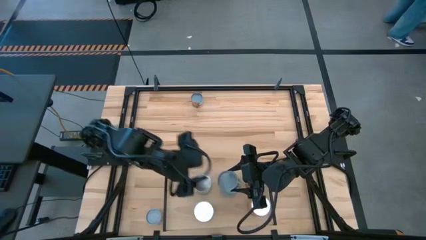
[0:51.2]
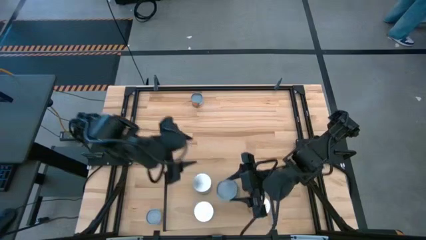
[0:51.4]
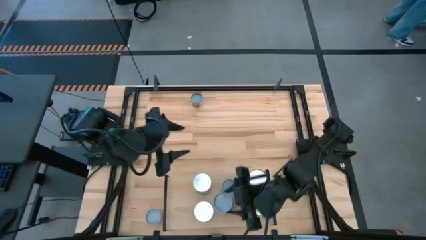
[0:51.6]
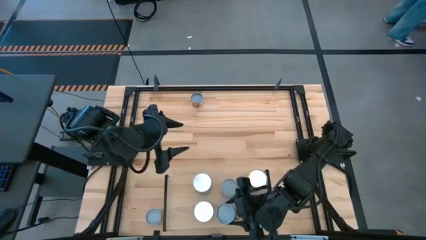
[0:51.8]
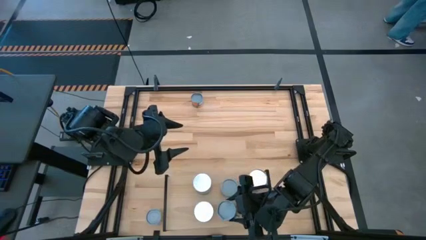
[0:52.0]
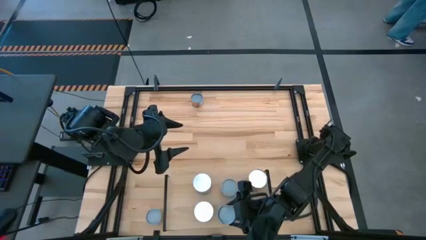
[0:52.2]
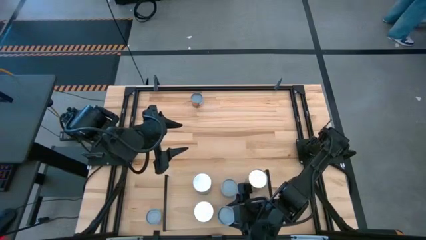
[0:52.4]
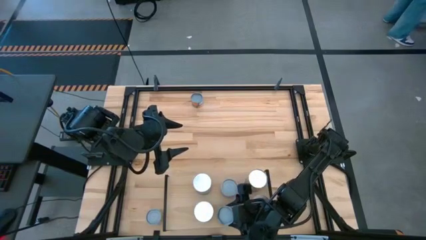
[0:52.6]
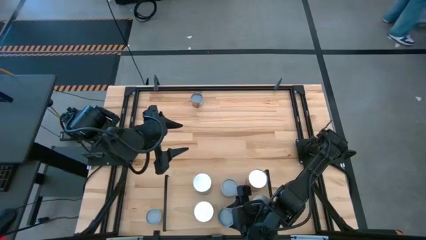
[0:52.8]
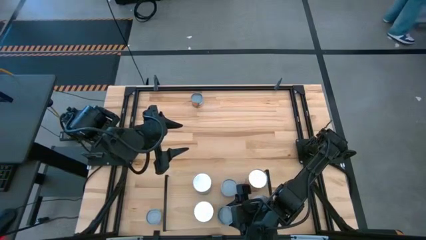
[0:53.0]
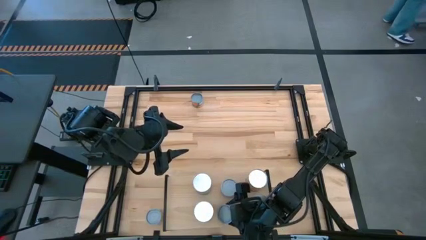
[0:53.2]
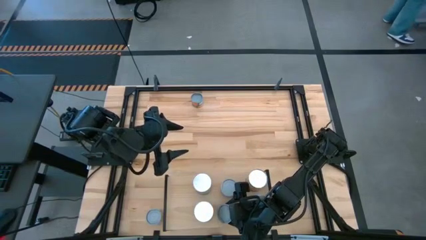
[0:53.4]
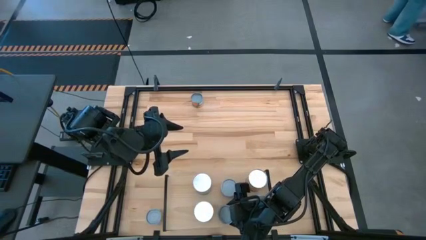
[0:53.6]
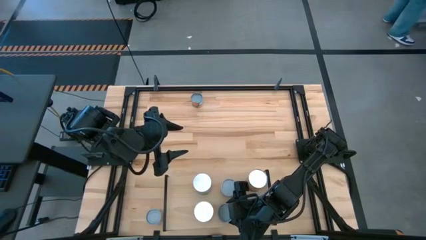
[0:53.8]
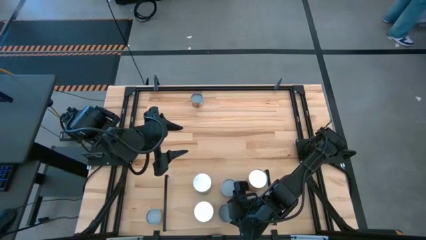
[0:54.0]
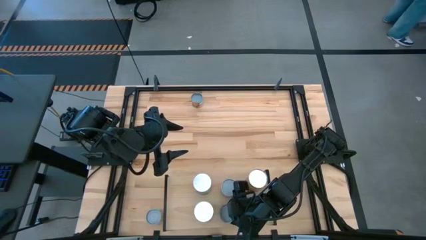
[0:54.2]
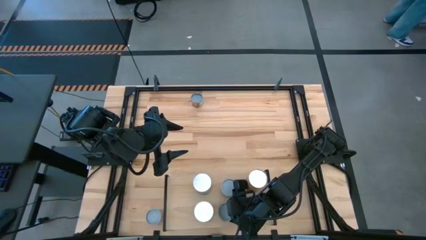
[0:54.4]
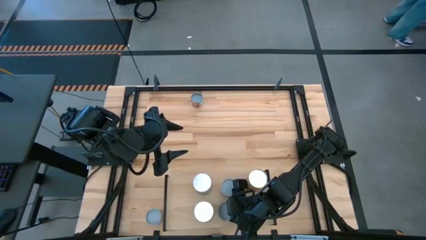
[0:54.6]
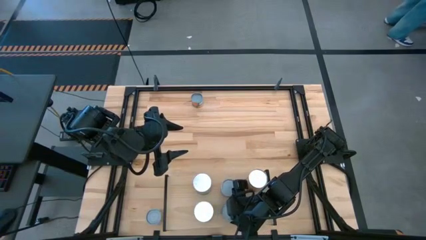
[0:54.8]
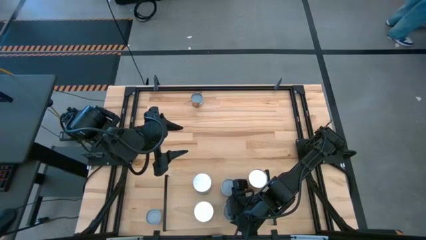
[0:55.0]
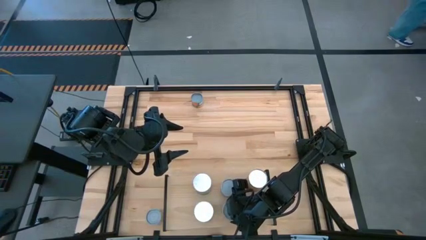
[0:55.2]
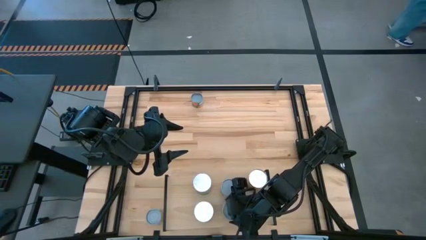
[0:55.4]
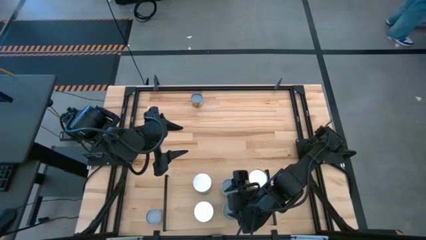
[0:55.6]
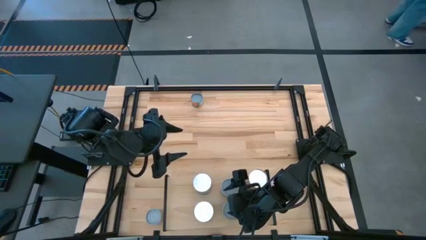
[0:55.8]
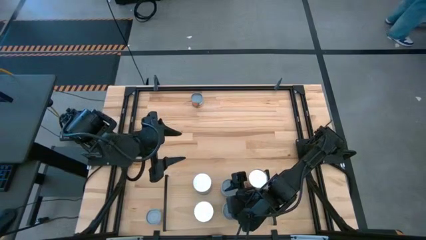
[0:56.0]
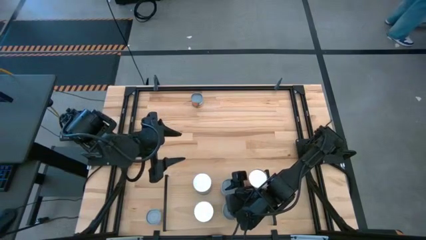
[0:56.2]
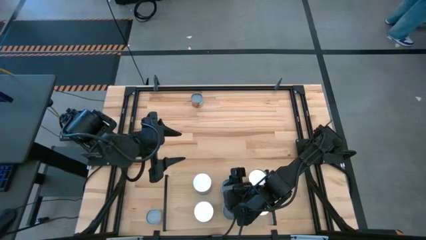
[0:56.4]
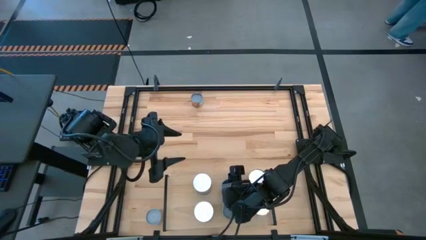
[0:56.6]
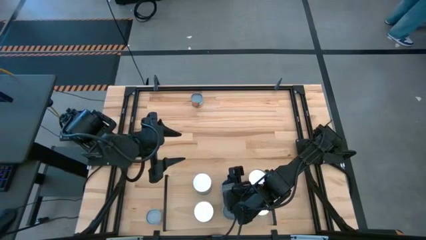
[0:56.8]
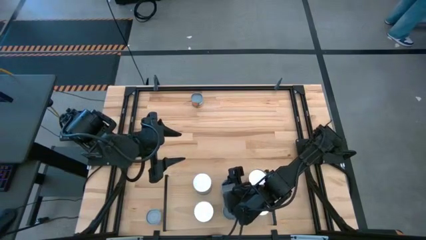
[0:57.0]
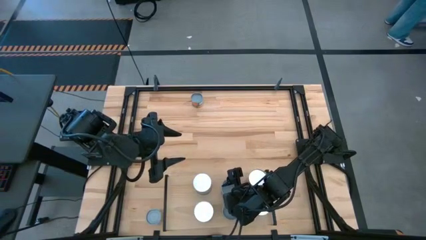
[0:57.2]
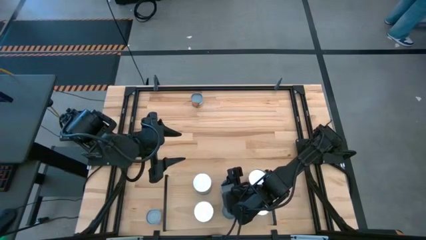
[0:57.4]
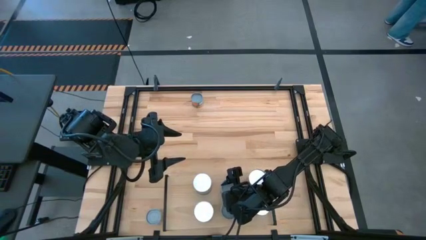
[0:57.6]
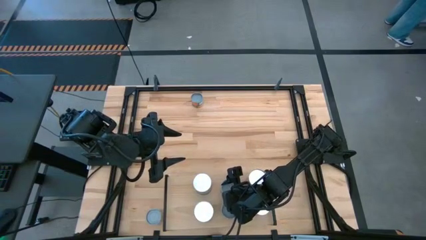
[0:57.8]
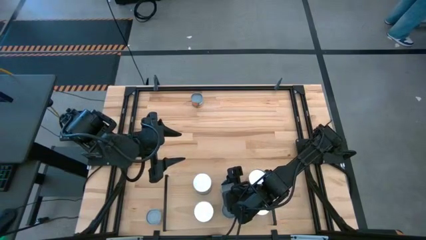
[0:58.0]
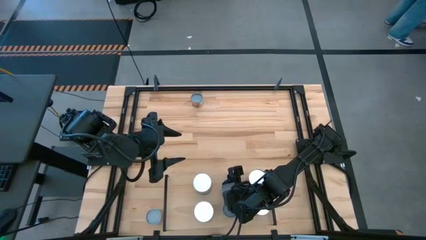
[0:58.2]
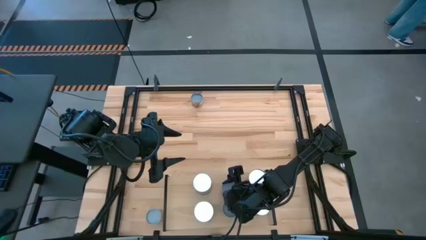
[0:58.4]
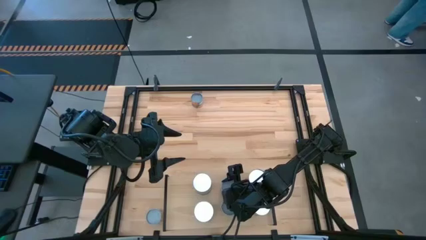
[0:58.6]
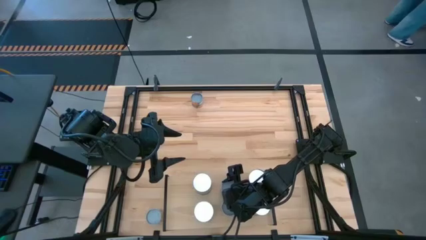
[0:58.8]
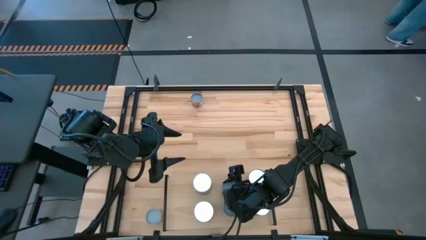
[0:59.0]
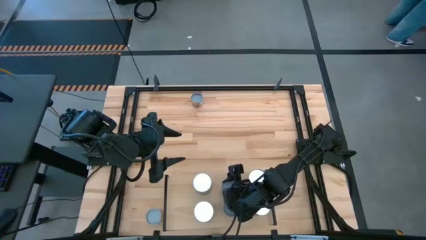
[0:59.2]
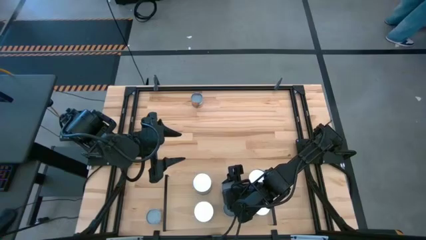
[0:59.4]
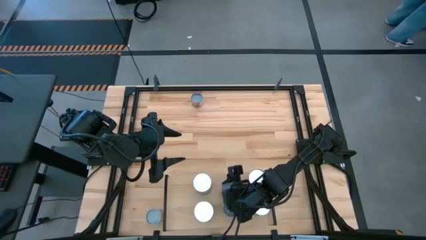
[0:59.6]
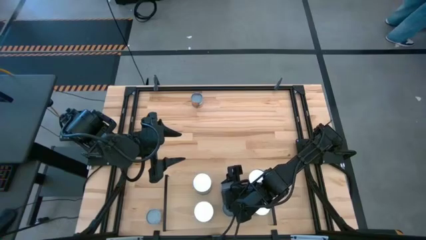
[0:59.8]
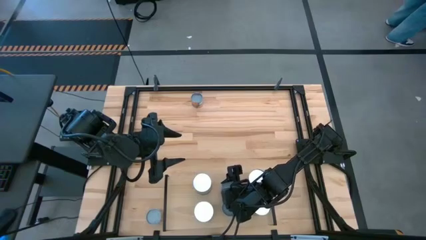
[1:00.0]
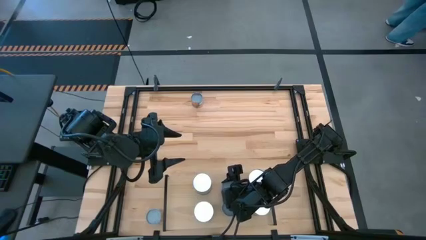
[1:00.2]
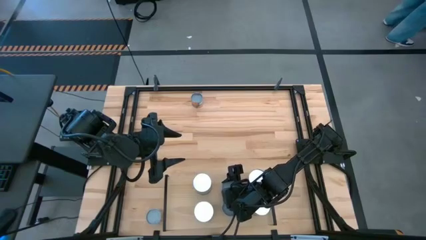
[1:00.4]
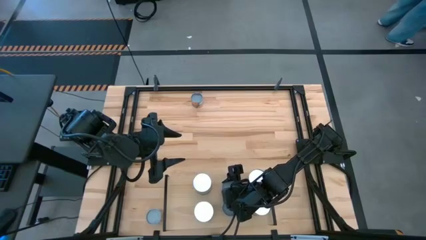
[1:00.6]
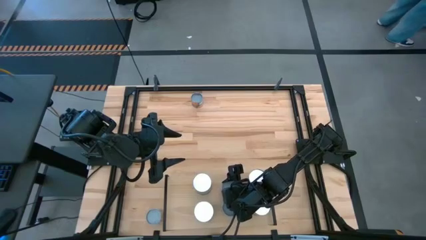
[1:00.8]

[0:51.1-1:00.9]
Task: Pick and place cans onto a shelf
Put the small canned peas on the shelf

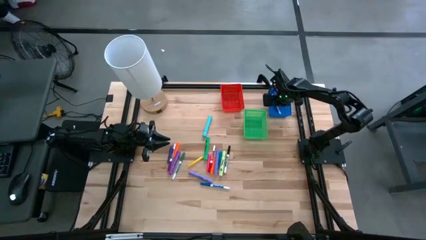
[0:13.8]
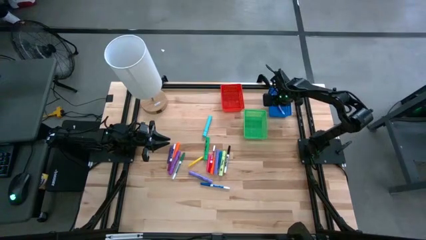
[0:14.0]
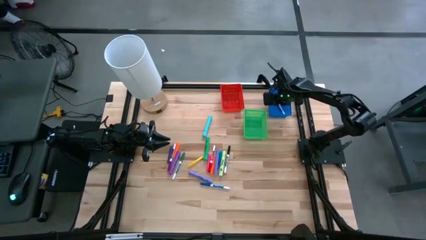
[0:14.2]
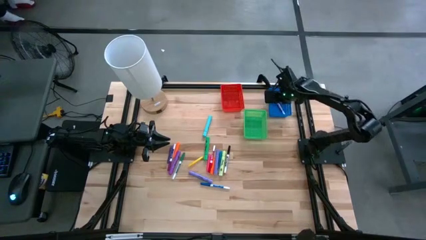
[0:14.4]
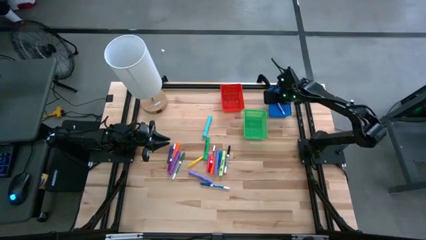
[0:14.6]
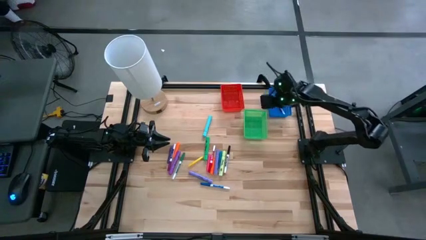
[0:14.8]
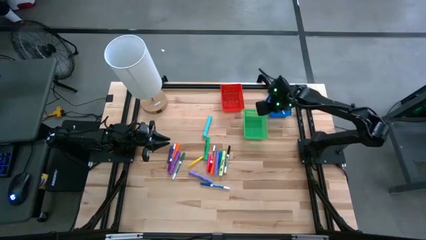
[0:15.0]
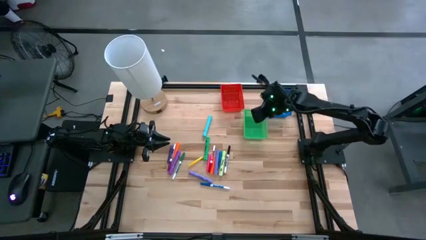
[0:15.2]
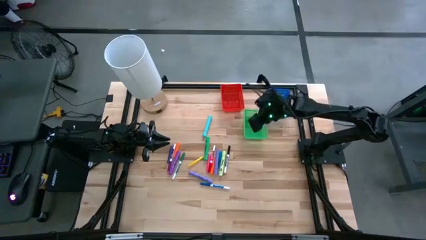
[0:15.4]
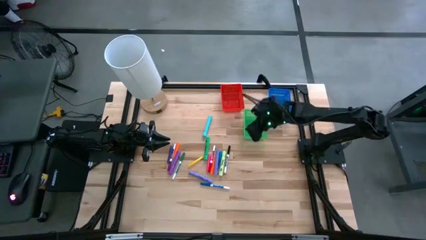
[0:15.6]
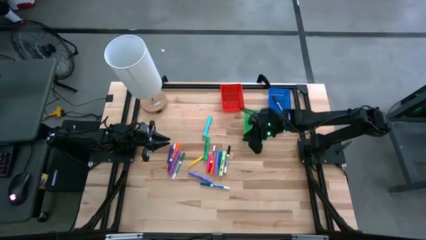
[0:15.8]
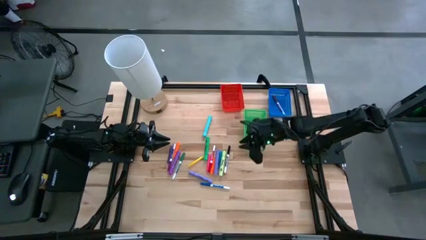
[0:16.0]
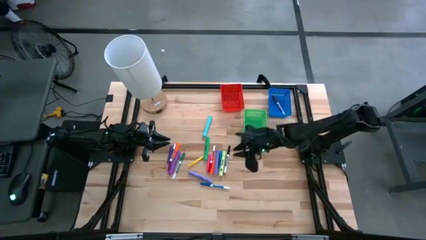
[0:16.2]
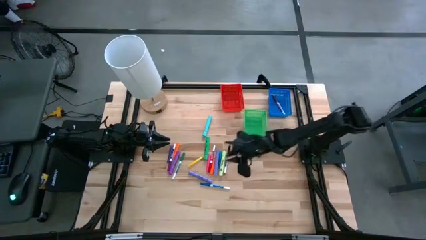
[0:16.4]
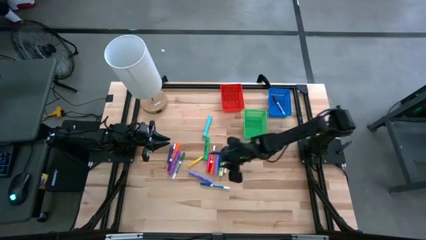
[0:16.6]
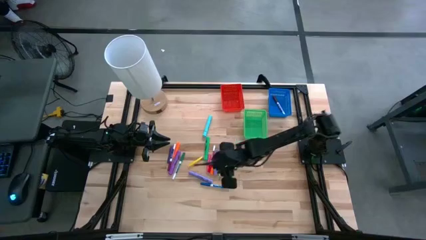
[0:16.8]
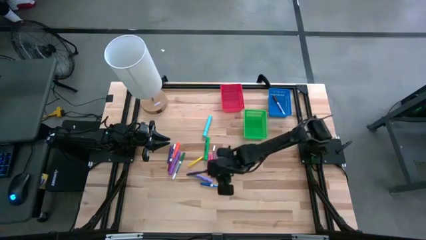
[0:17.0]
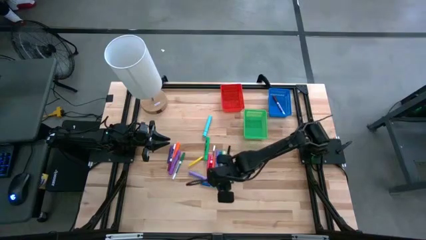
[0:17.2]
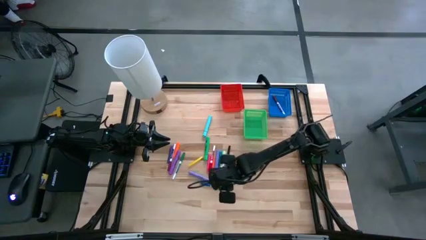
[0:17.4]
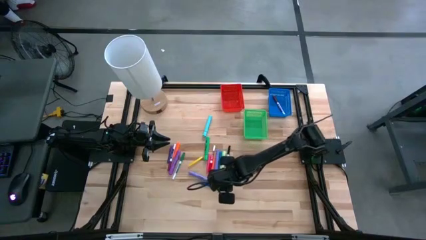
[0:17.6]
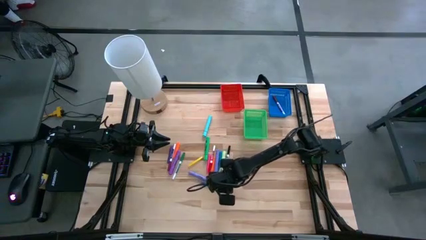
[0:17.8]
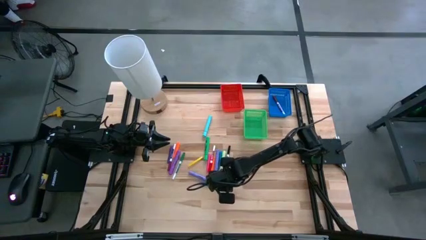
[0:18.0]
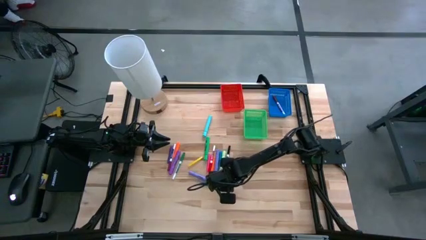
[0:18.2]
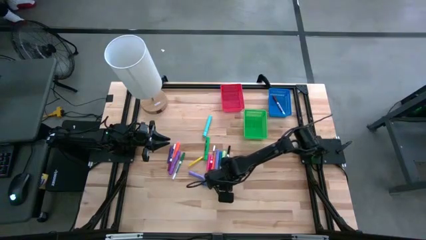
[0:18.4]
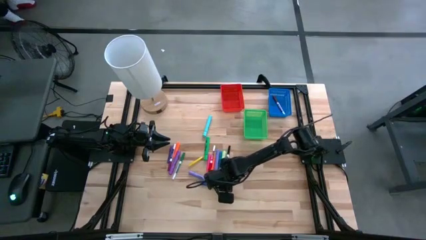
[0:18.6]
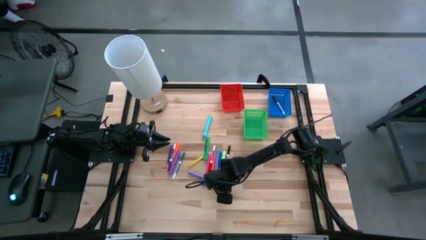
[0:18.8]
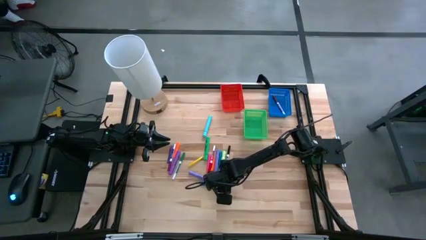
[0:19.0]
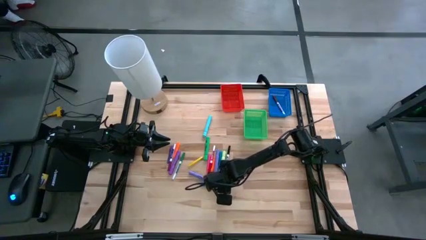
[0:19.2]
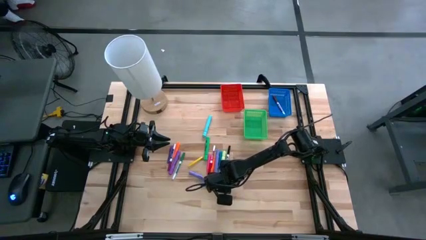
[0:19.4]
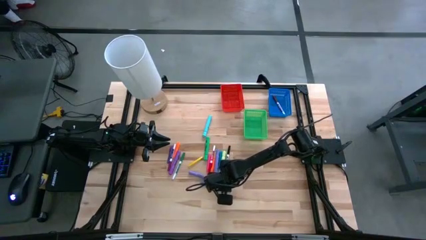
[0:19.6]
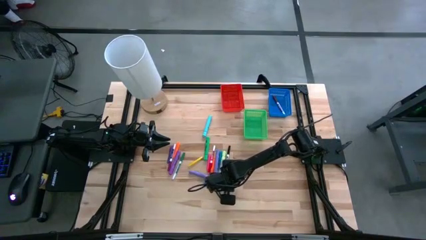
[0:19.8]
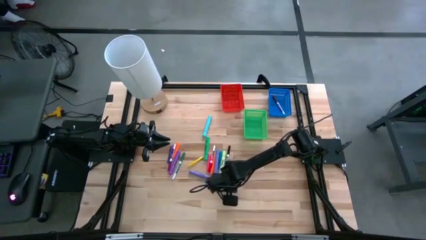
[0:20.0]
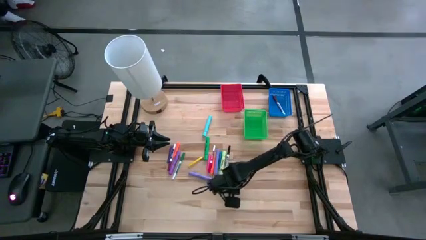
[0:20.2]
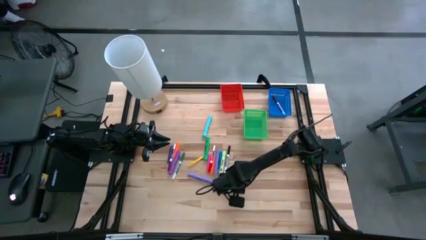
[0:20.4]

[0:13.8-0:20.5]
Task: Pick & Place Markers
Put the blue marker in the blue bin
